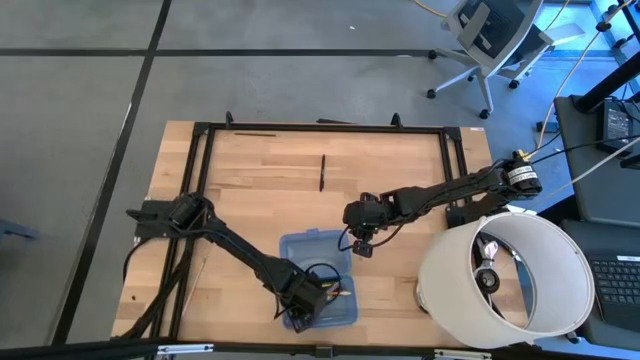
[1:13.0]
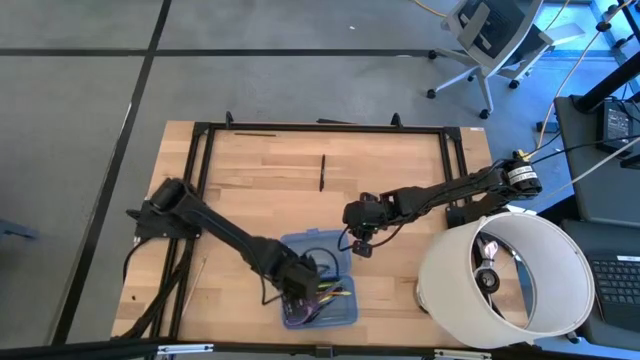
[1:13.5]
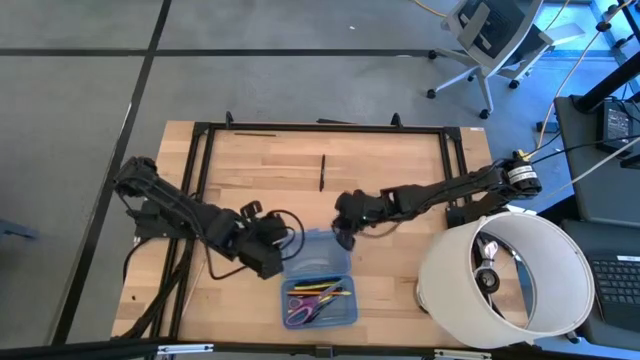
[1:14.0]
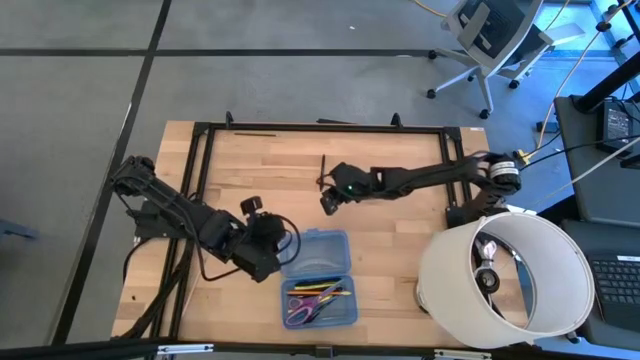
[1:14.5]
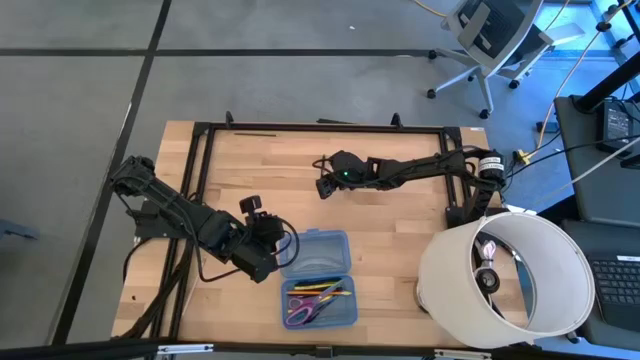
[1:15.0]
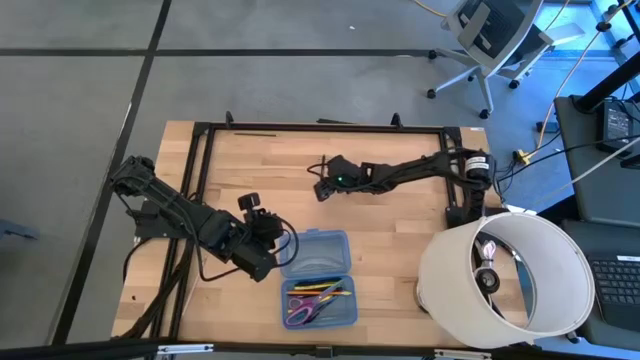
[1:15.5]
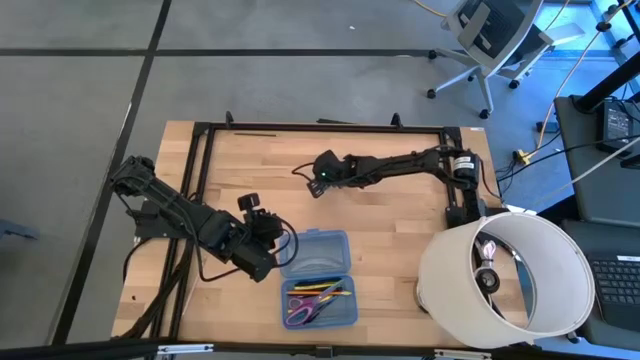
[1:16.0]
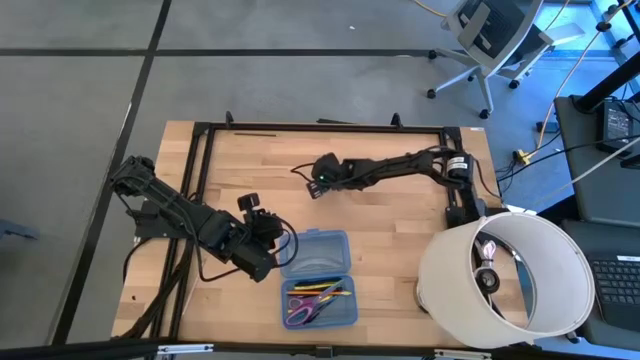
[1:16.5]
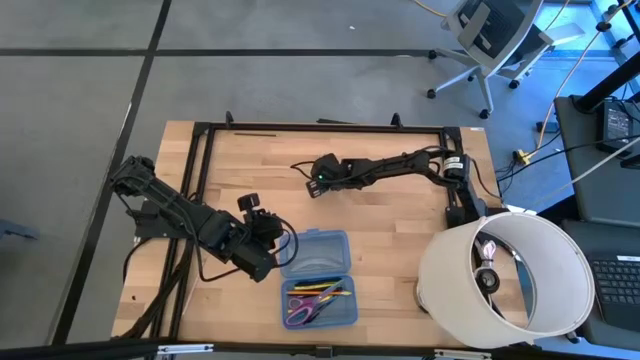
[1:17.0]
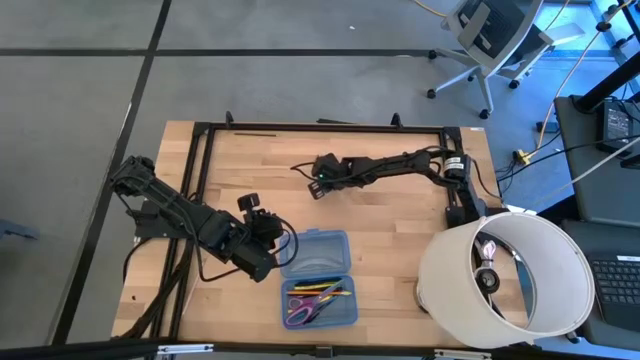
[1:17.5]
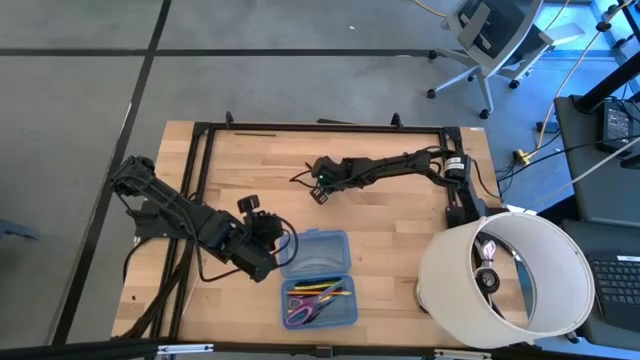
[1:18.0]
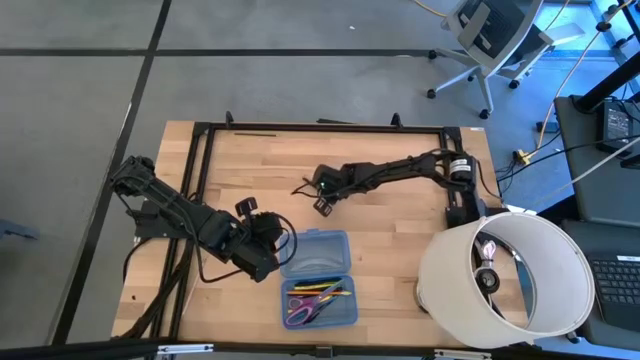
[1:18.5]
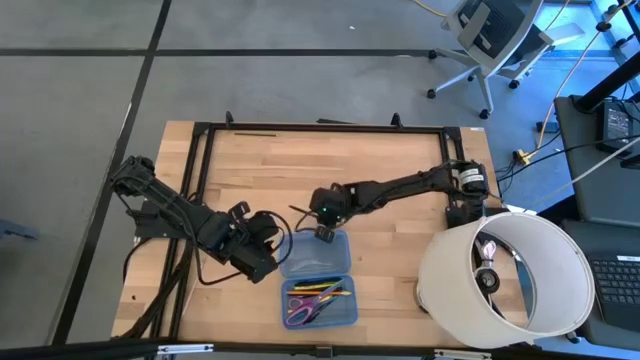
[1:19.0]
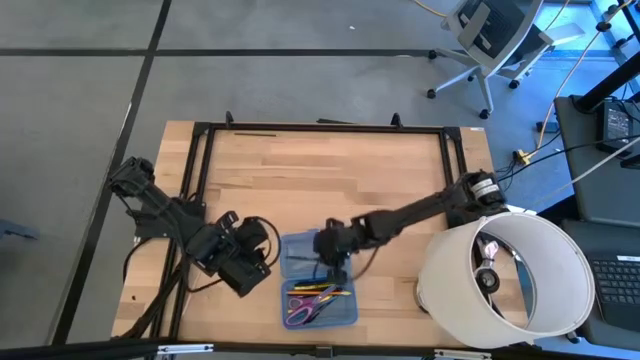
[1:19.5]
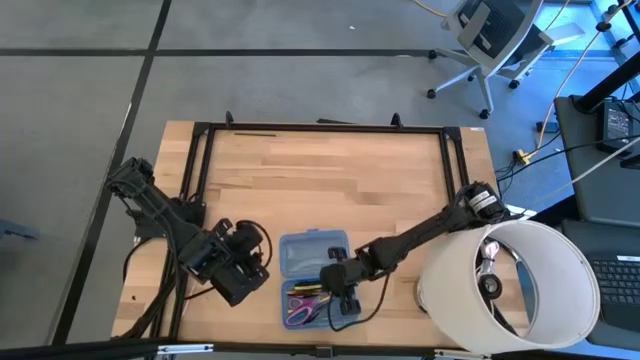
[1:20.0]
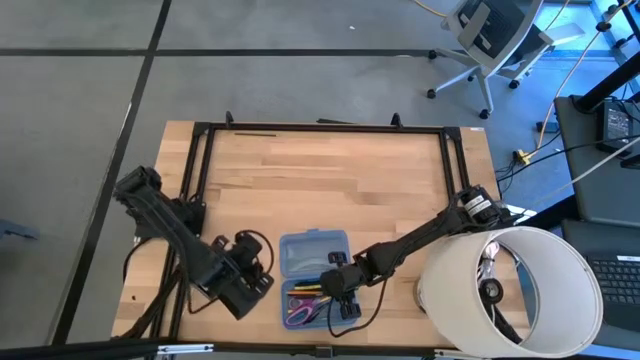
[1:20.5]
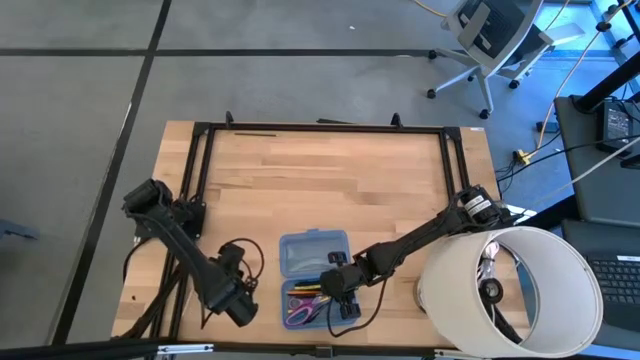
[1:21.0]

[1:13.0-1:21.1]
Task: Pick & place school supplies into a supply box
Put the black pen into the blue supply box

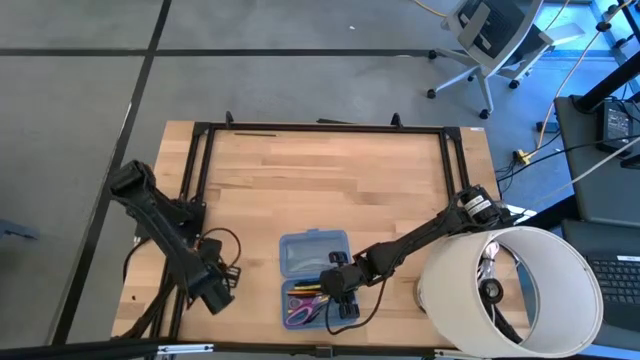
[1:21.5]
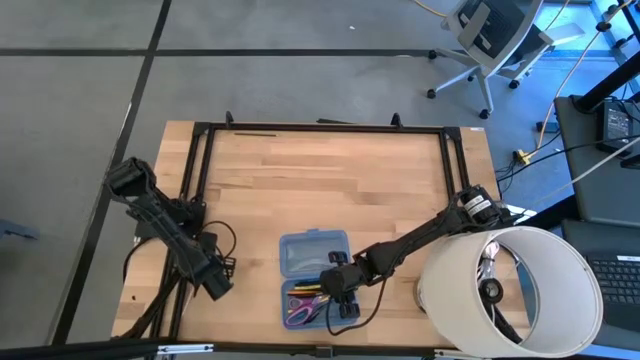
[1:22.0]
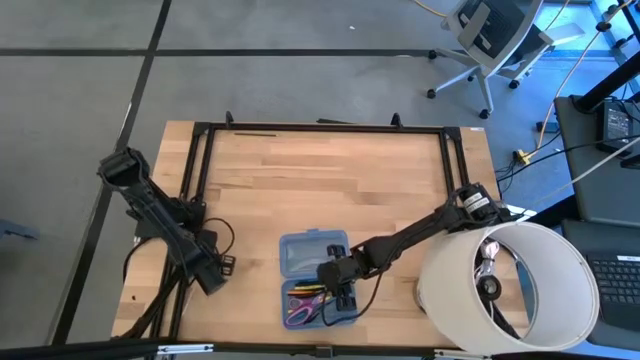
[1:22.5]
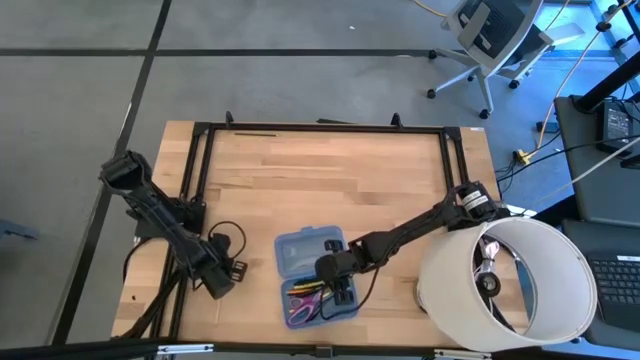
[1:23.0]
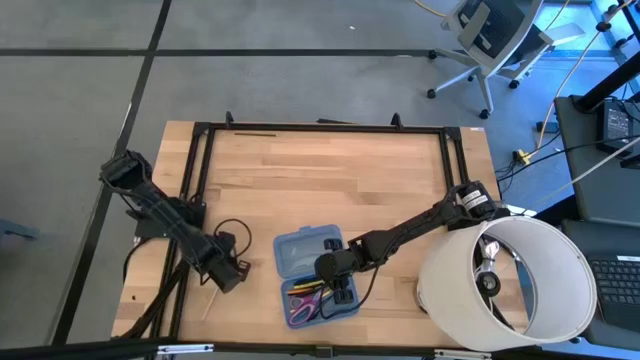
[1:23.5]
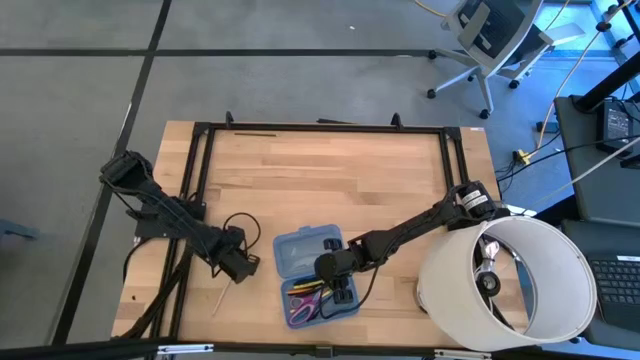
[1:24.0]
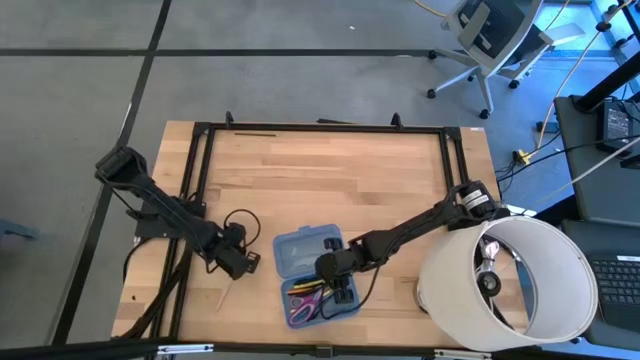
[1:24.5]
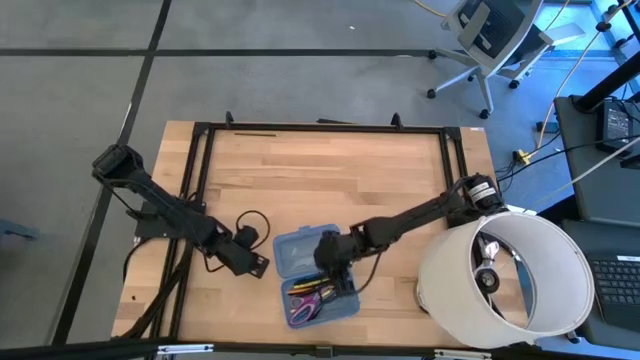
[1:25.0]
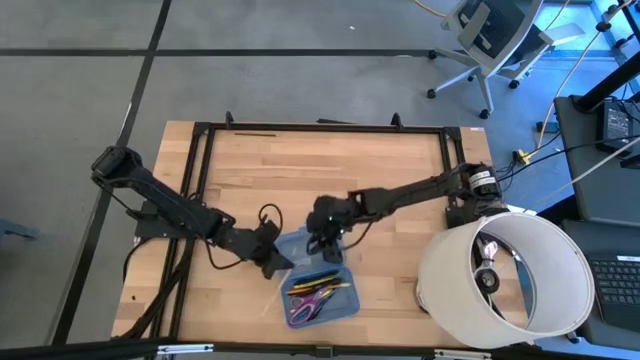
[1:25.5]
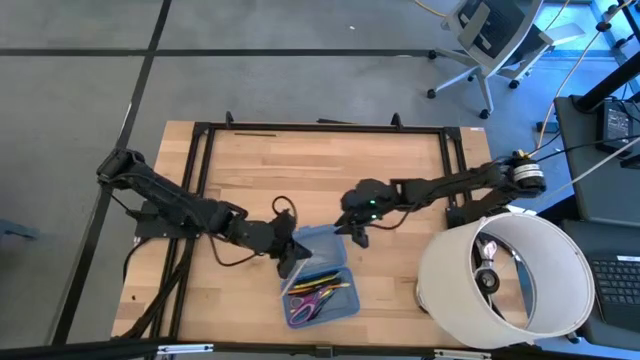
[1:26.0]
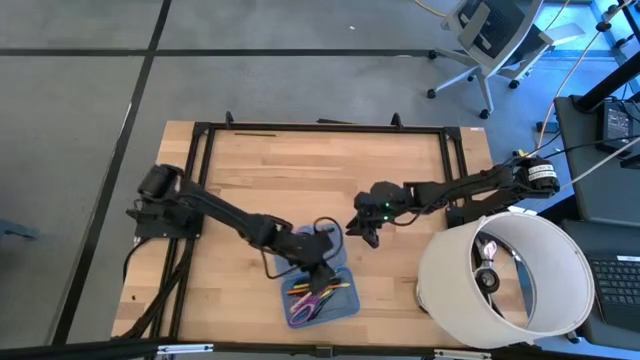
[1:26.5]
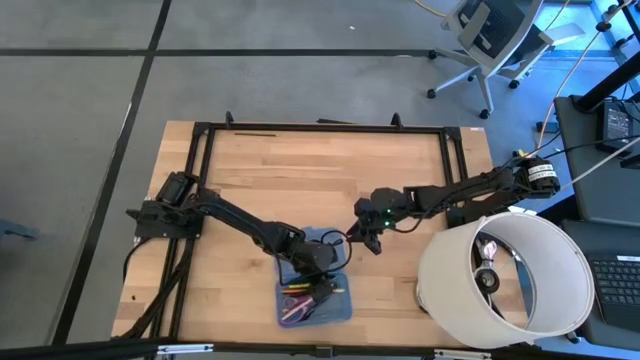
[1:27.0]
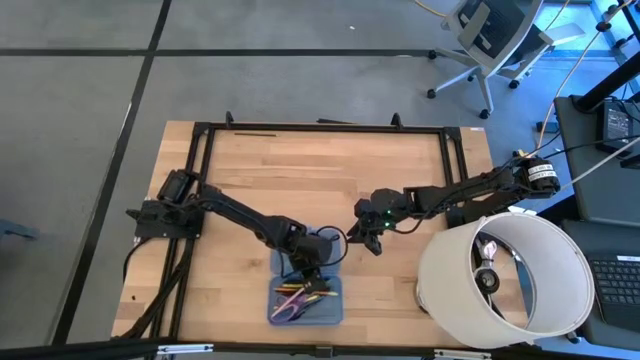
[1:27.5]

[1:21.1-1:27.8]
Put the pink pencil into the blue supply box

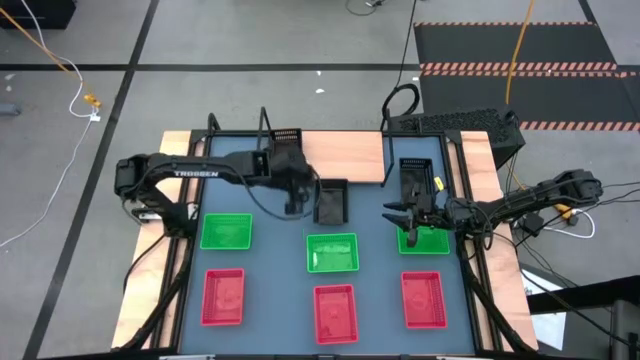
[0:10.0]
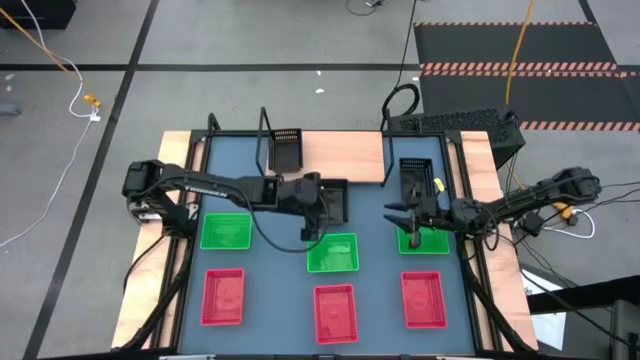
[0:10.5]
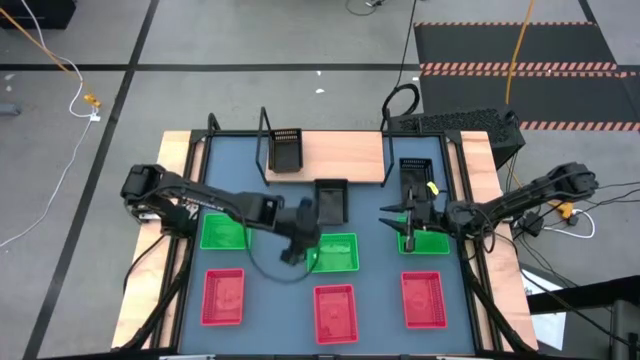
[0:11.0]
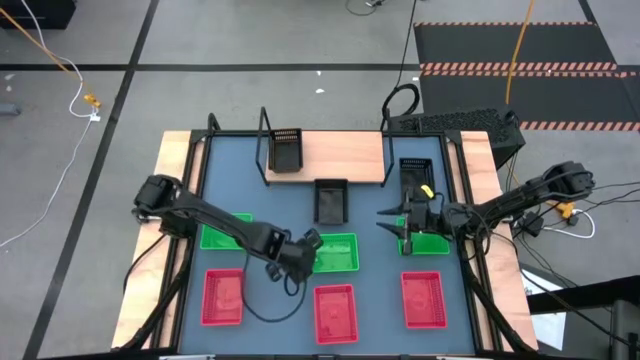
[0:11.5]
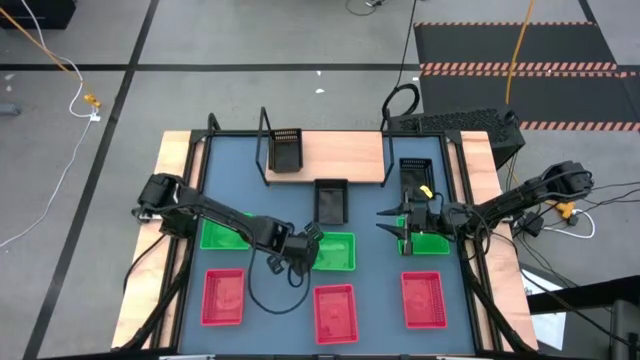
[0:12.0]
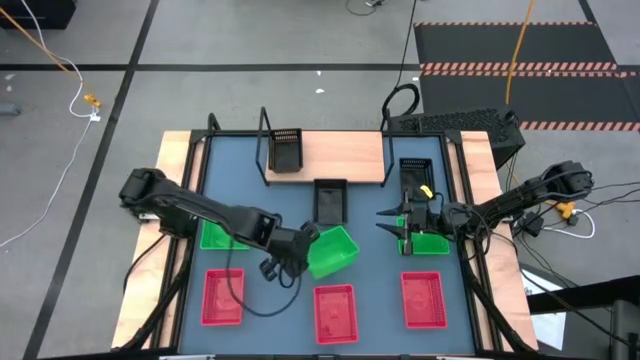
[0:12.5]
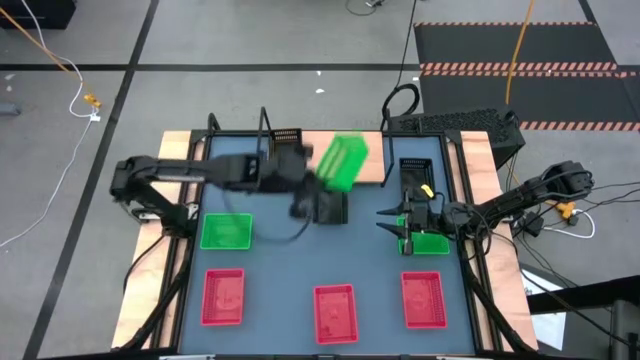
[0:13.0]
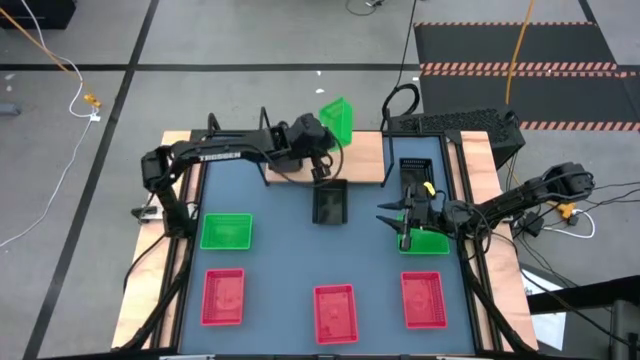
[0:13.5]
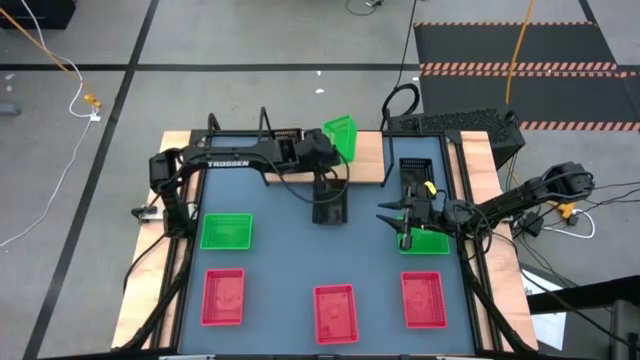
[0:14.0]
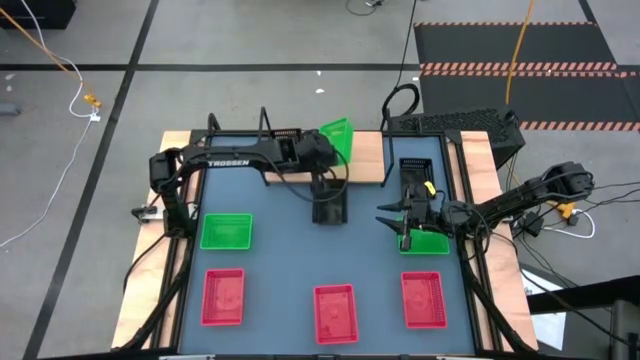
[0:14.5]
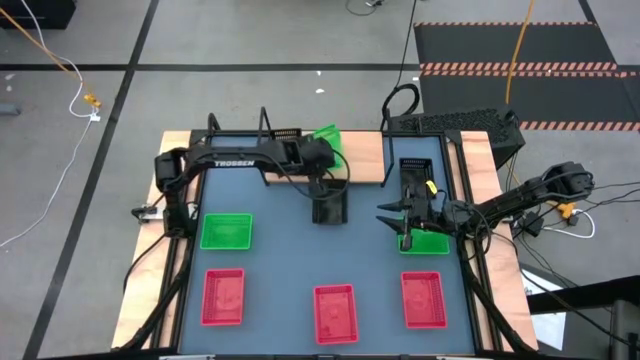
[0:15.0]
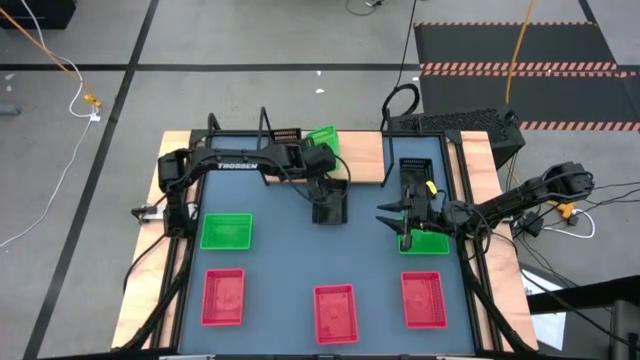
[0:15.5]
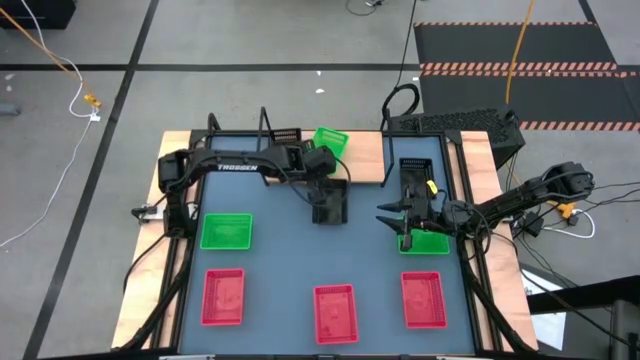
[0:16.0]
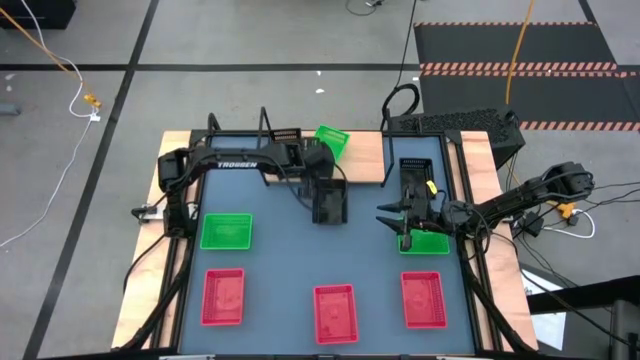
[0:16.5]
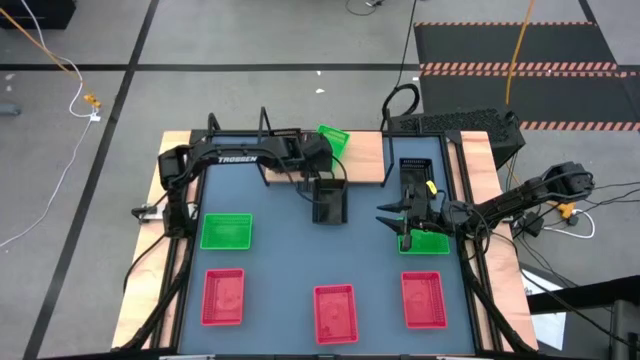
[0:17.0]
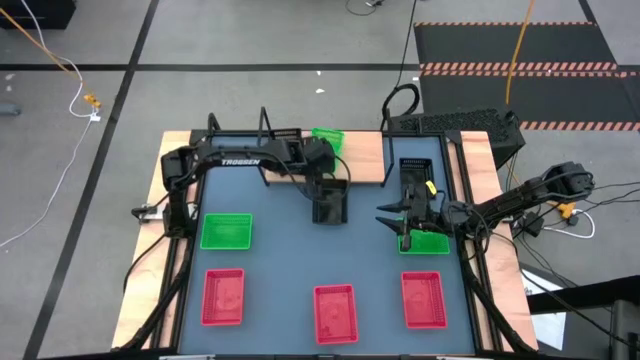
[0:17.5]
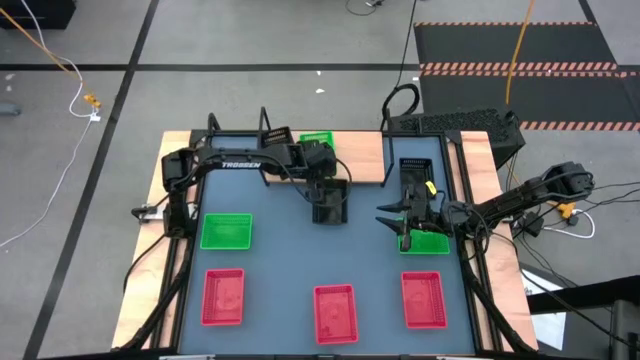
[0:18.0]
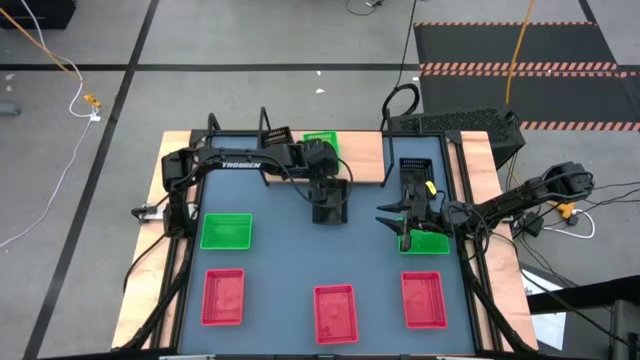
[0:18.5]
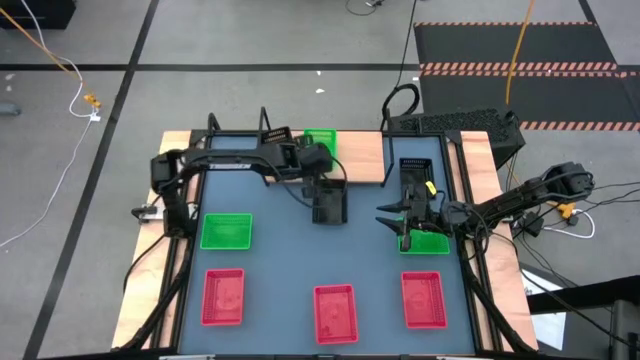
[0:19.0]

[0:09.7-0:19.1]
Task: Stack baskets on shelf by color
Put the middle green bin on the shelf
